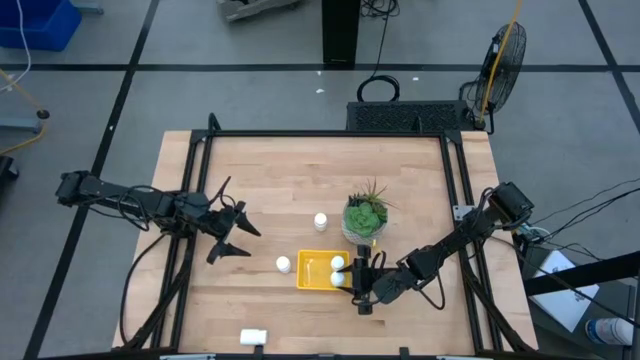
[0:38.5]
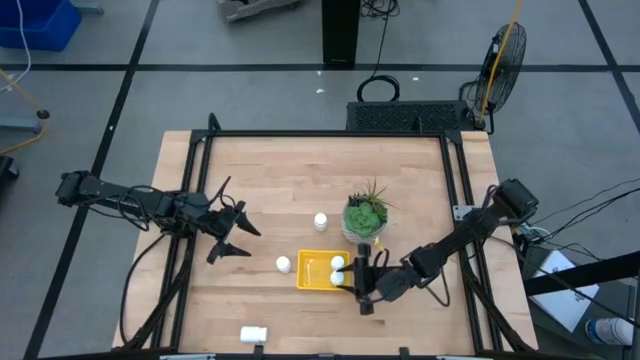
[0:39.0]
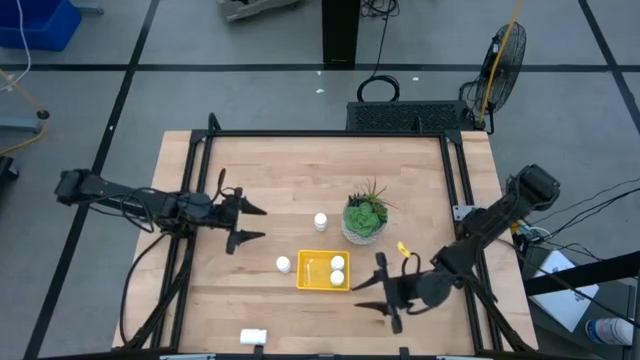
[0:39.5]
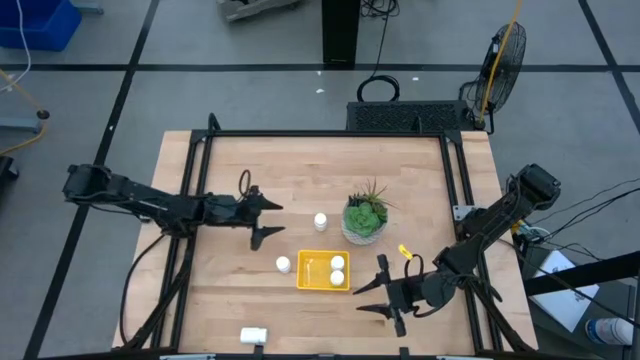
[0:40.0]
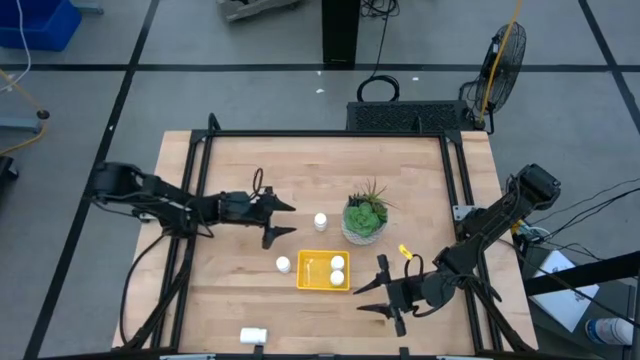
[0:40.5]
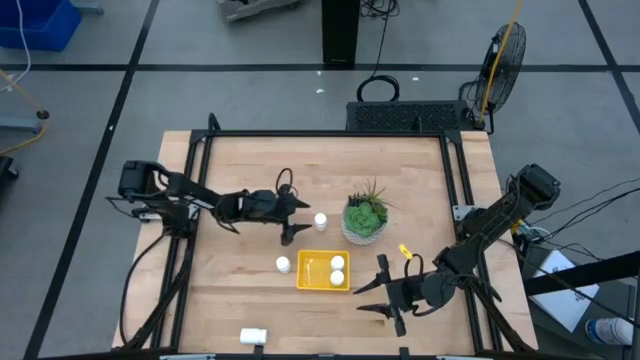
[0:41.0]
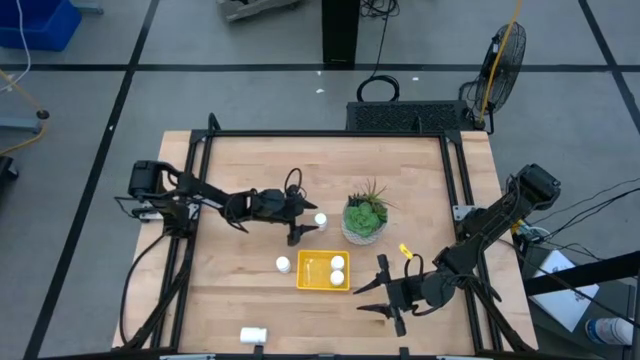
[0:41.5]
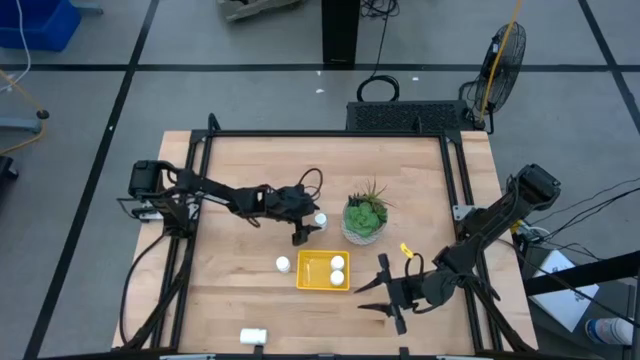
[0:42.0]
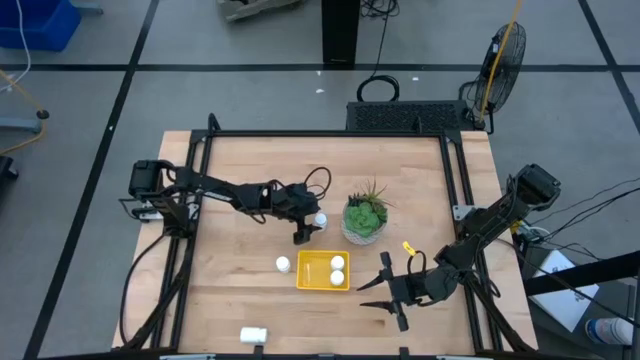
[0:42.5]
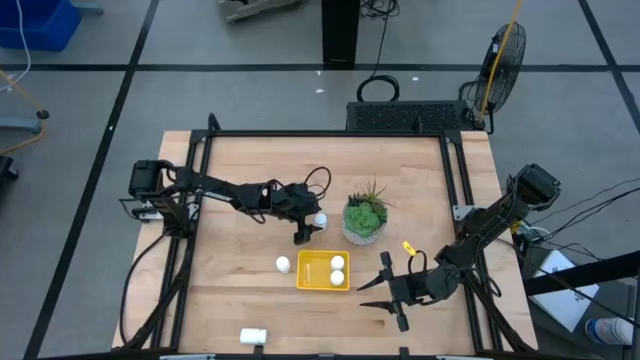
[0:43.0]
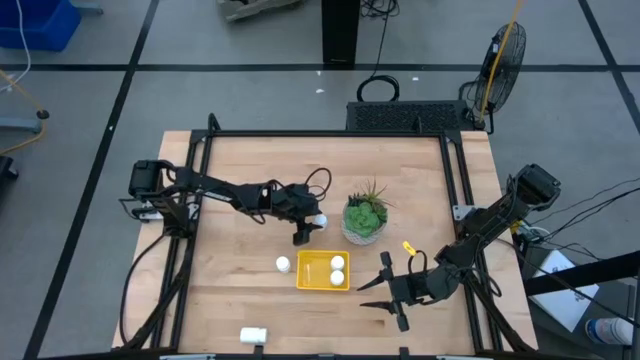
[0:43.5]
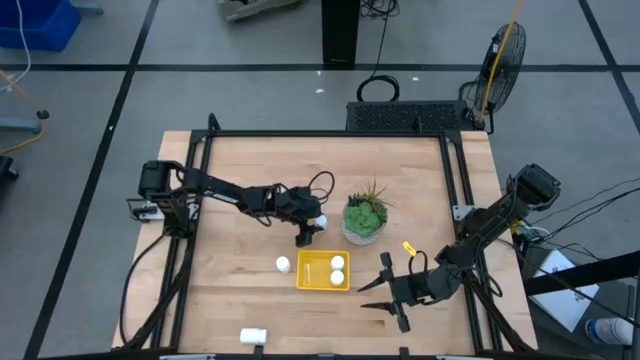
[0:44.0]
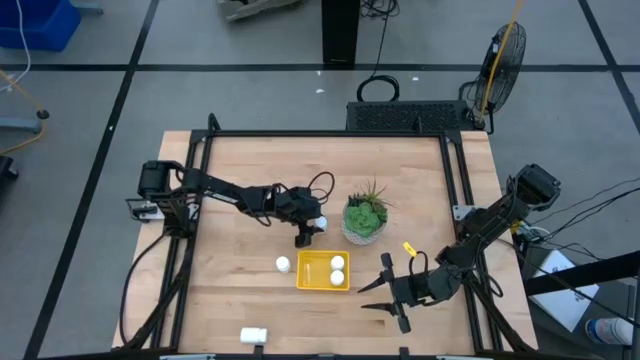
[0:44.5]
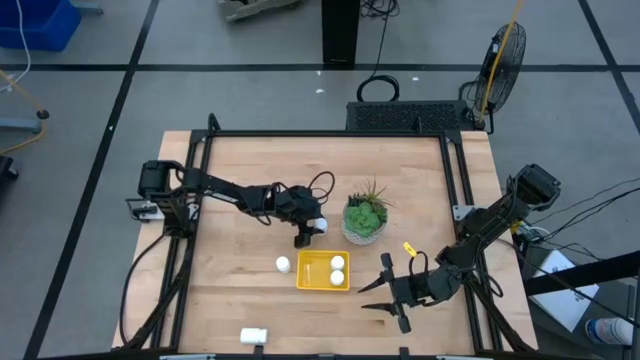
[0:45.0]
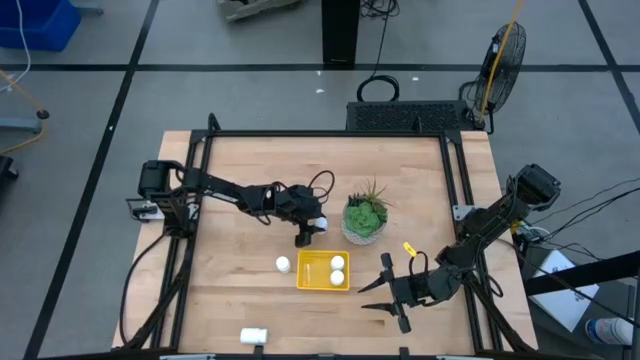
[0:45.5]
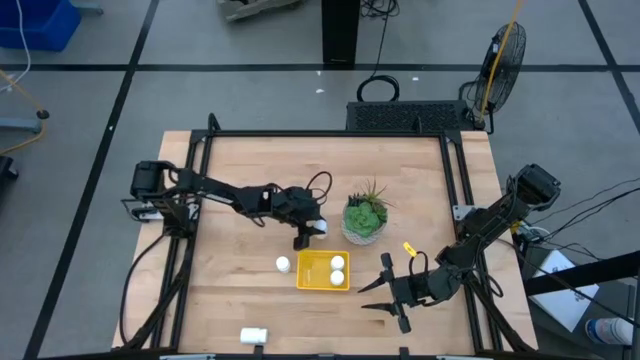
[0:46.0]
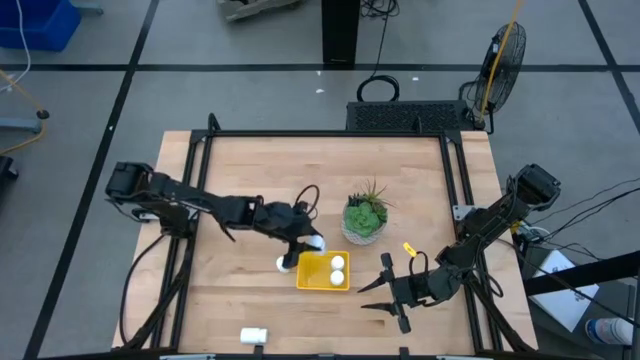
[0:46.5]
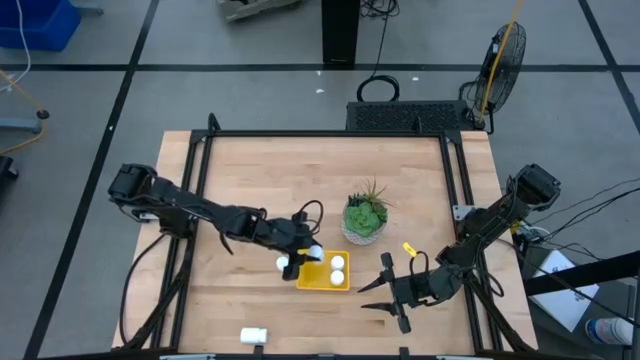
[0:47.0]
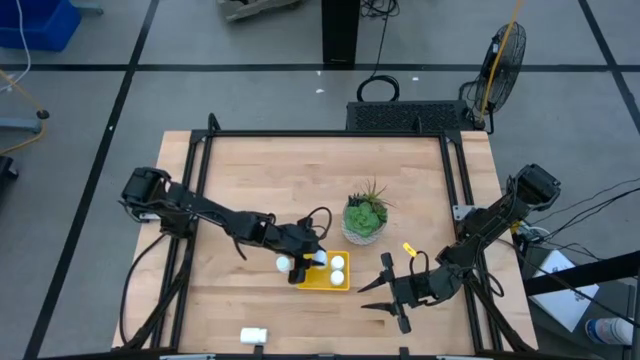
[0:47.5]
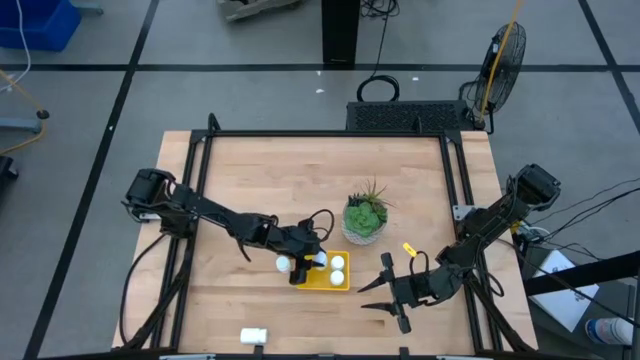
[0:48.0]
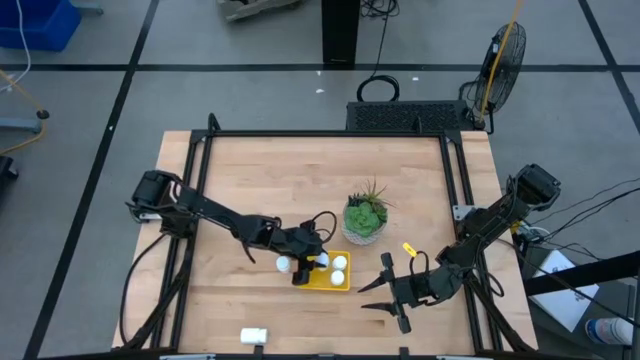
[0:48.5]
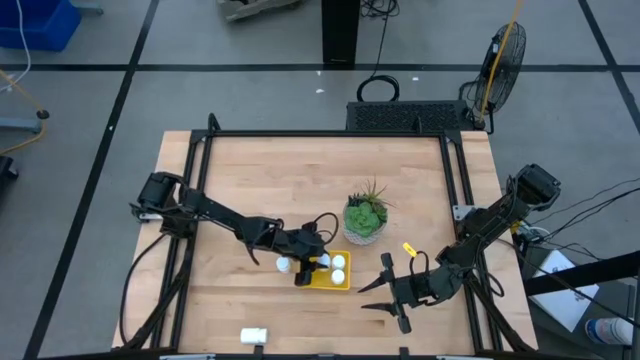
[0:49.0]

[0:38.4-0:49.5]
Task: Pick and place pill bottles into a basket
Put the top white pill bottle into the yellow bin

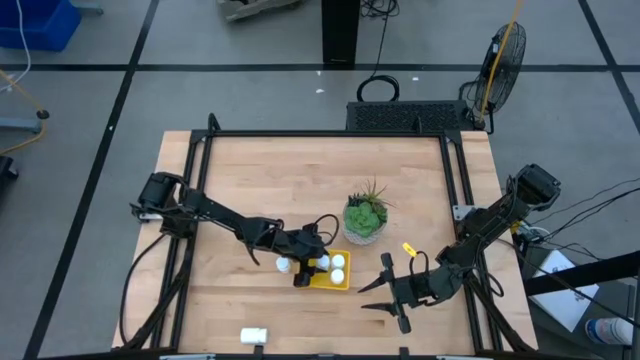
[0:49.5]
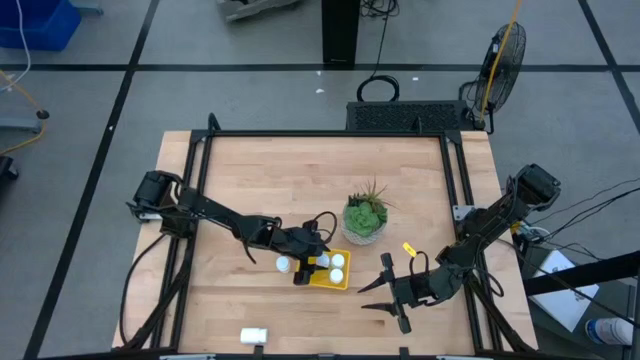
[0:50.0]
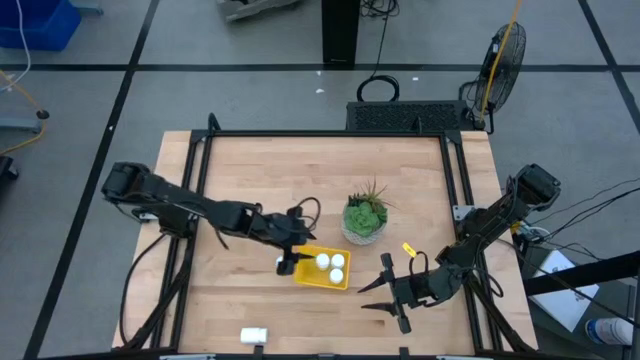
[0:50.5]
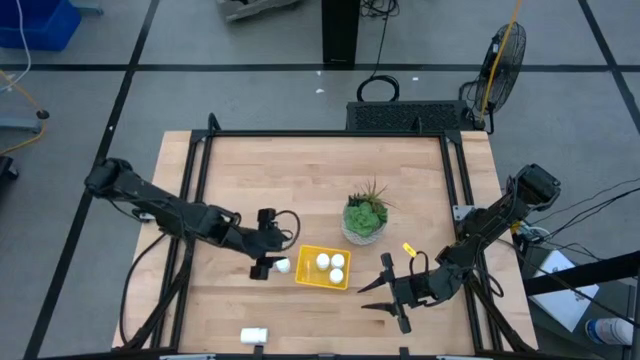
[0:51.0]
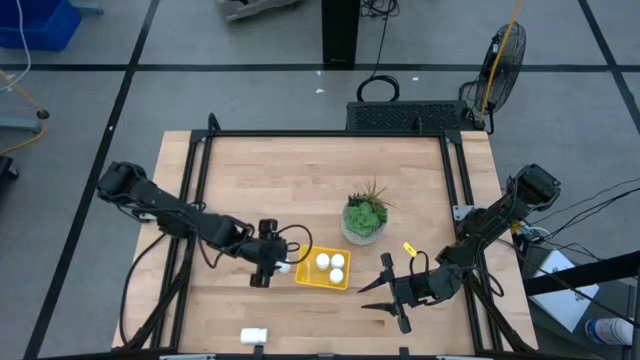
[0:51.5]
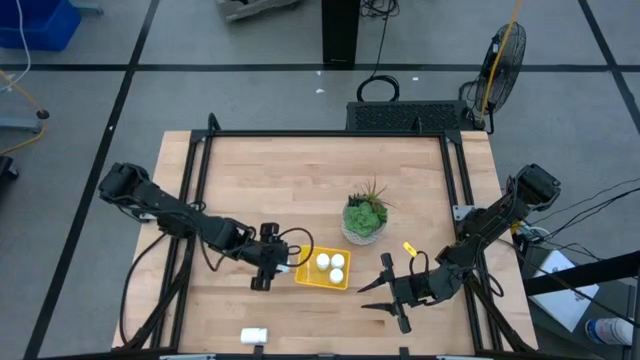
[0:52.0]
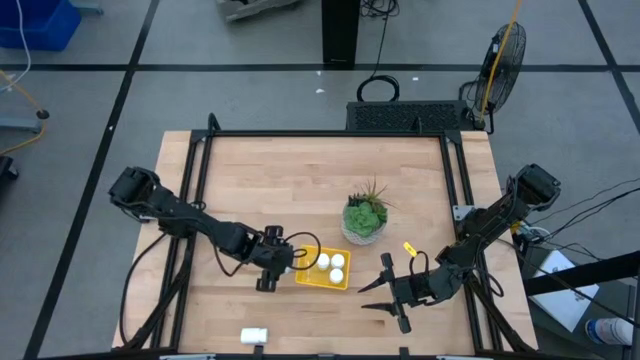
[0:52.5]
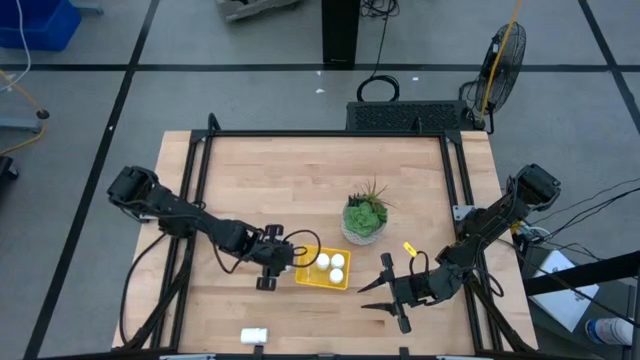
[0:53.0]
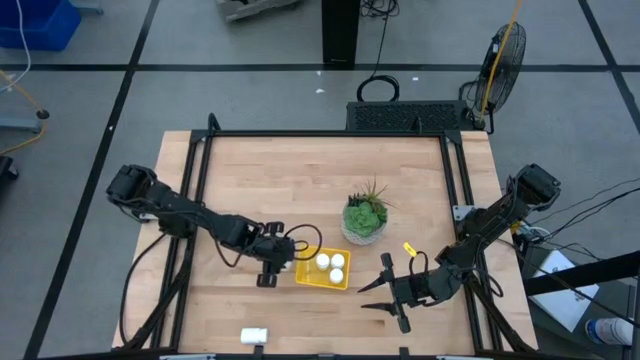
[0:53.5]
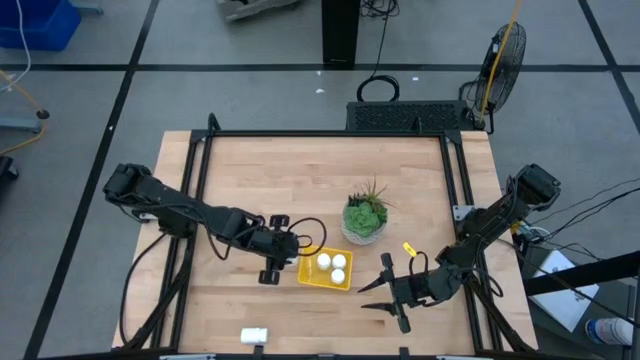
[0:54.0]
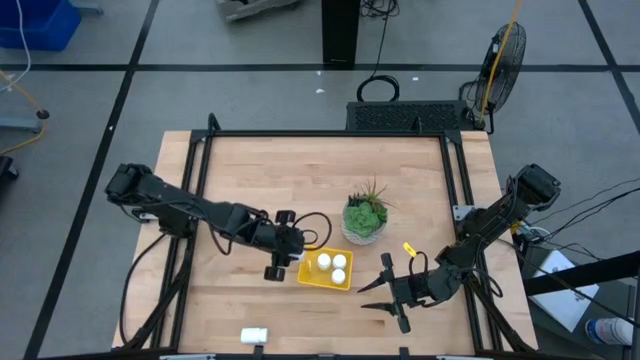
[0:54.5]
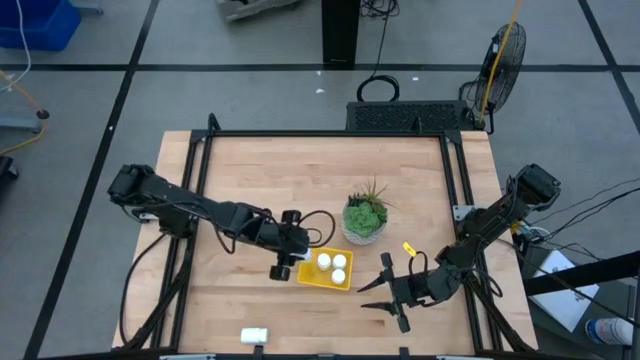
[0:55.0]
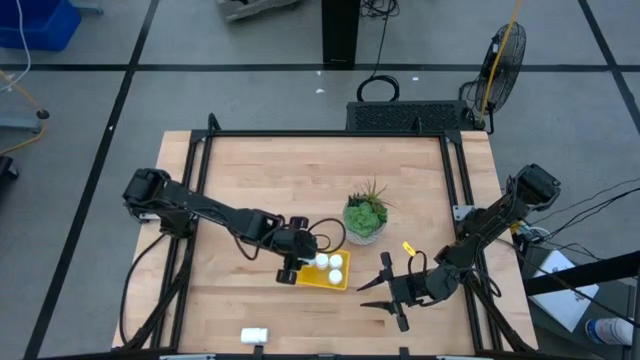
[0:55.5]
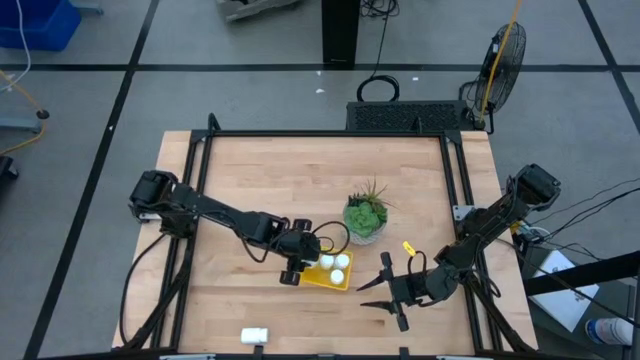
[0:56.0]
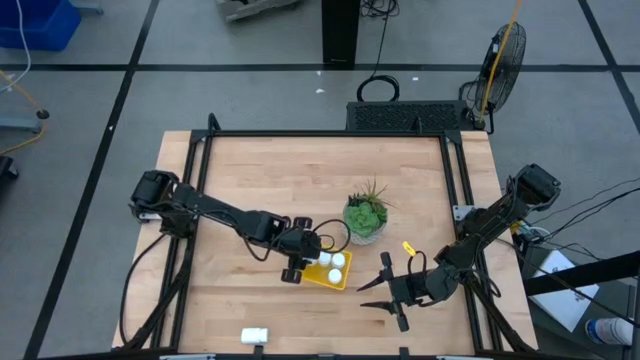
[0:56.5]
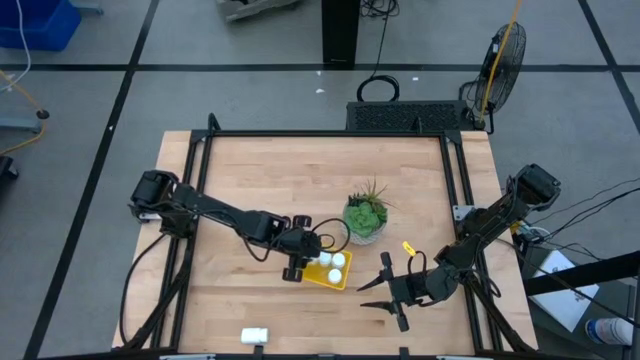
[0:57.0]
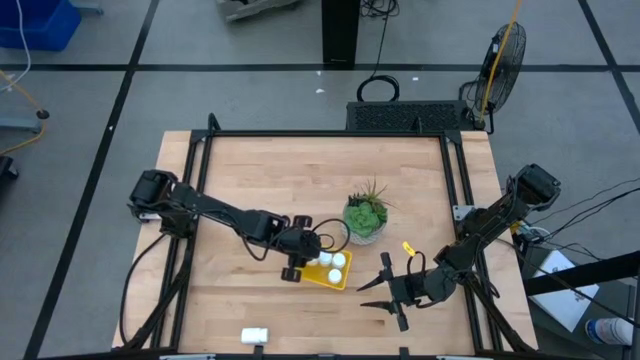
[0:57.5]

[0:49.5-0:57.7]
Put the top white pill bottle into the yellow bin
